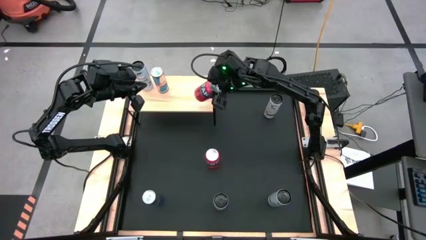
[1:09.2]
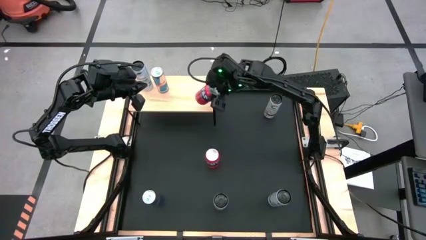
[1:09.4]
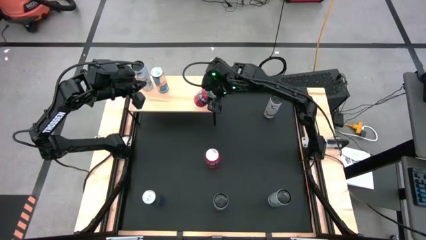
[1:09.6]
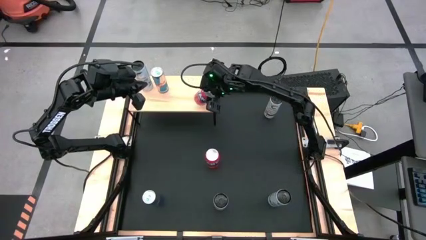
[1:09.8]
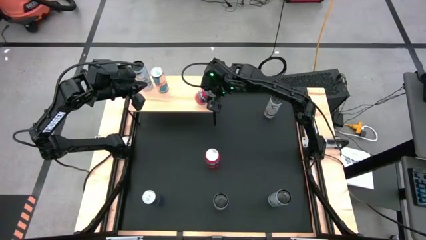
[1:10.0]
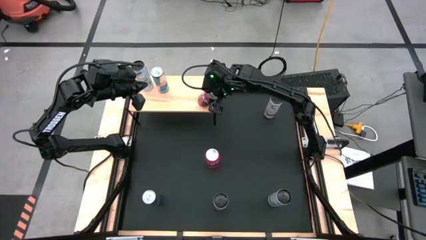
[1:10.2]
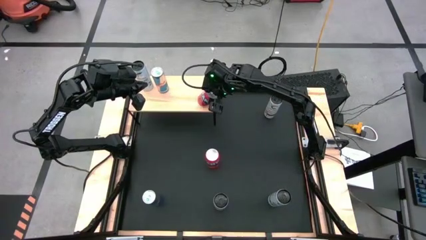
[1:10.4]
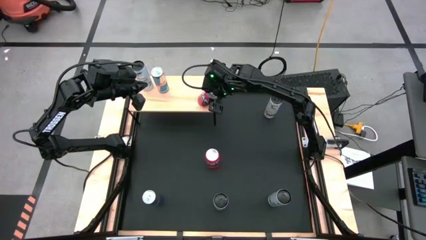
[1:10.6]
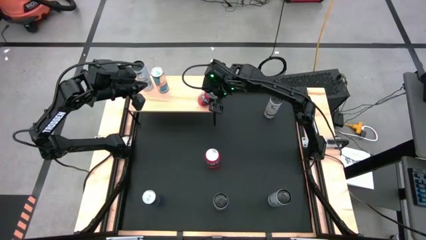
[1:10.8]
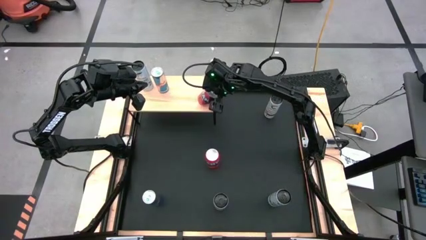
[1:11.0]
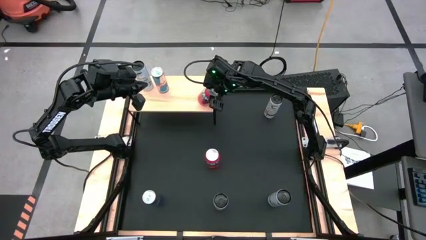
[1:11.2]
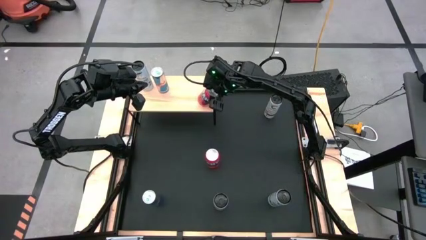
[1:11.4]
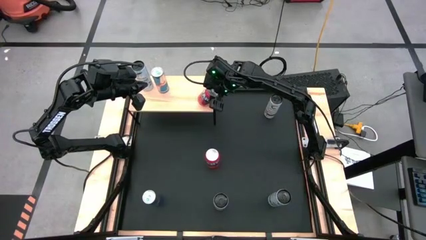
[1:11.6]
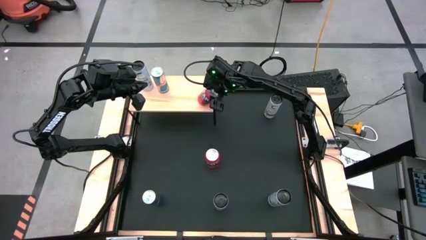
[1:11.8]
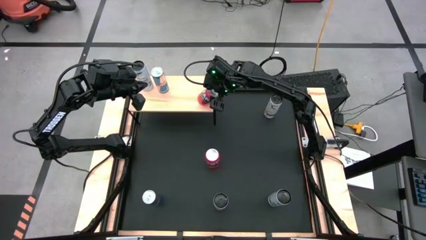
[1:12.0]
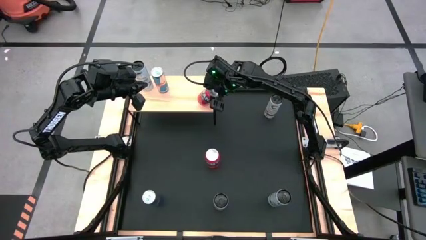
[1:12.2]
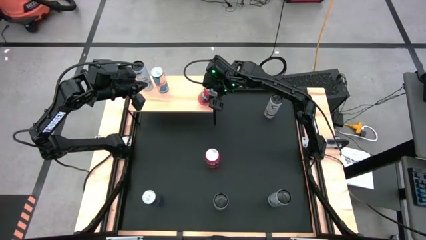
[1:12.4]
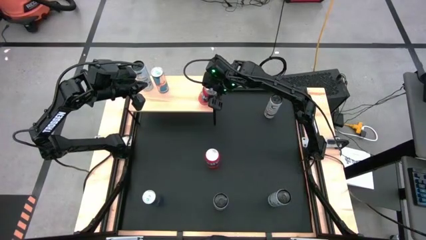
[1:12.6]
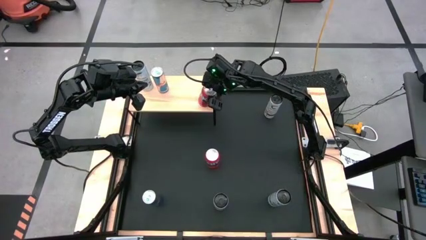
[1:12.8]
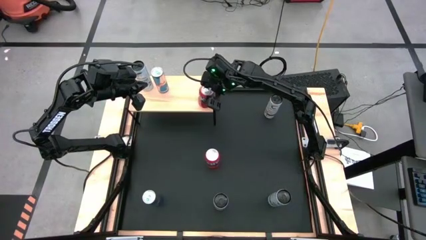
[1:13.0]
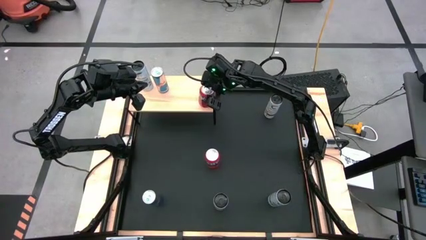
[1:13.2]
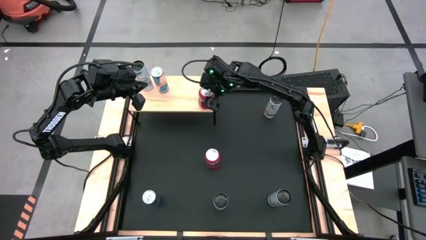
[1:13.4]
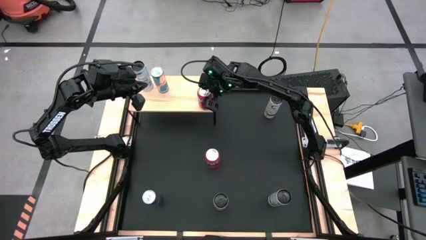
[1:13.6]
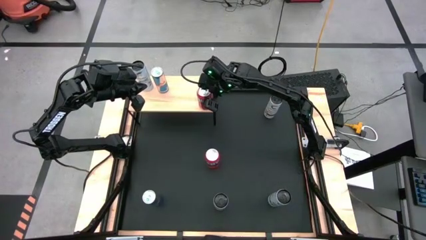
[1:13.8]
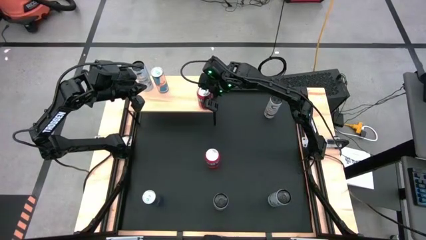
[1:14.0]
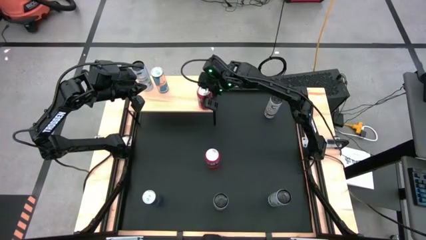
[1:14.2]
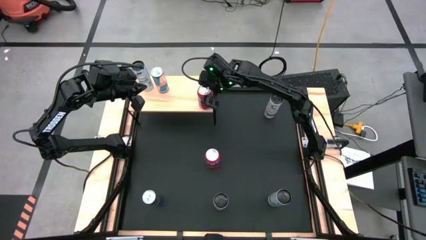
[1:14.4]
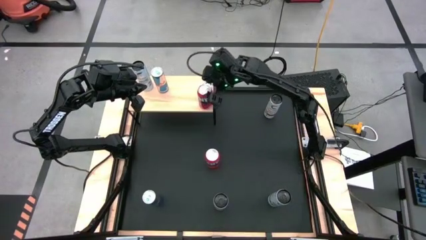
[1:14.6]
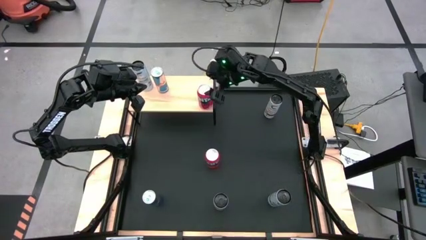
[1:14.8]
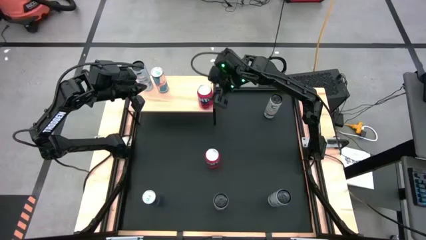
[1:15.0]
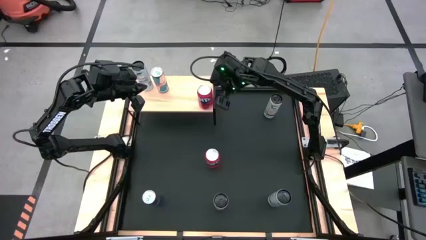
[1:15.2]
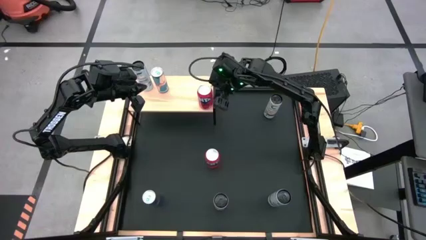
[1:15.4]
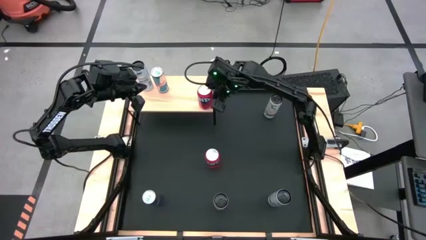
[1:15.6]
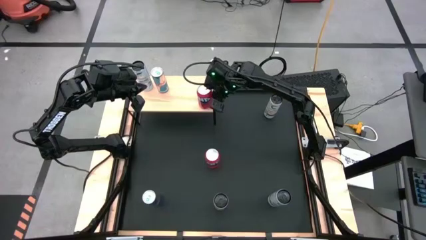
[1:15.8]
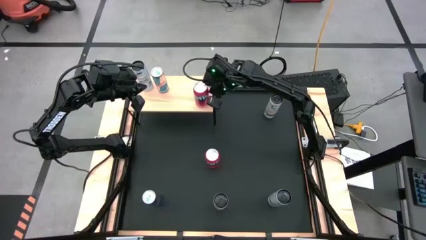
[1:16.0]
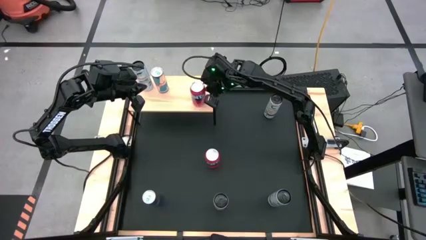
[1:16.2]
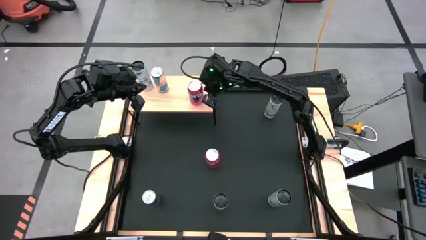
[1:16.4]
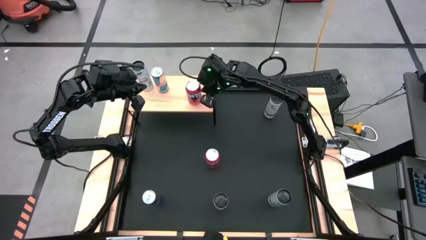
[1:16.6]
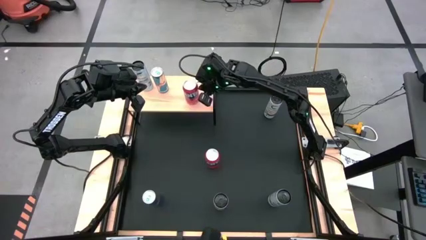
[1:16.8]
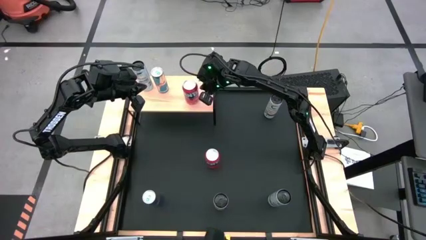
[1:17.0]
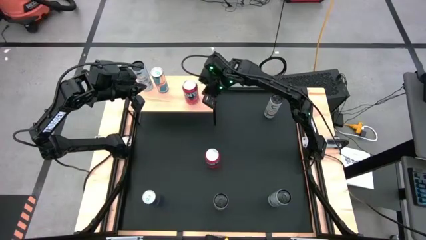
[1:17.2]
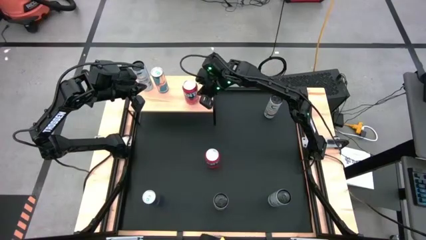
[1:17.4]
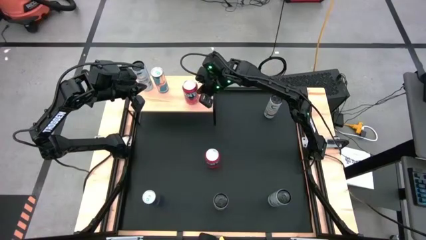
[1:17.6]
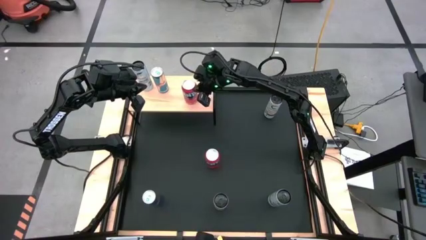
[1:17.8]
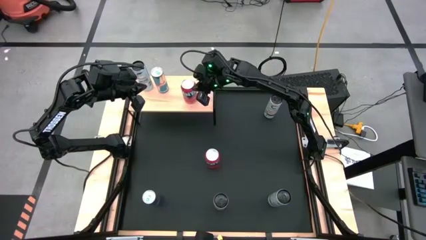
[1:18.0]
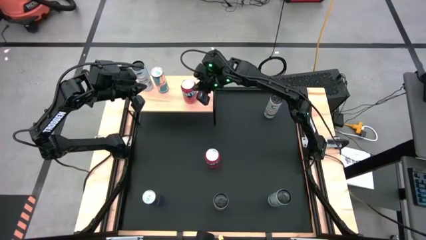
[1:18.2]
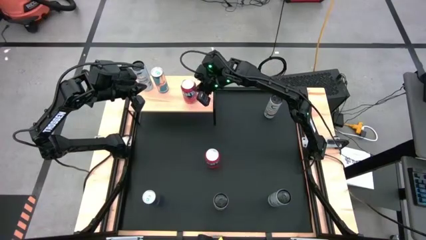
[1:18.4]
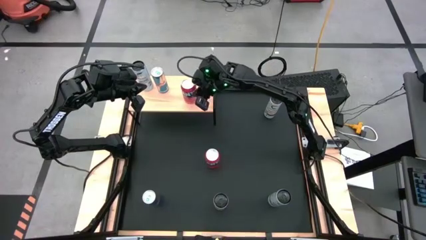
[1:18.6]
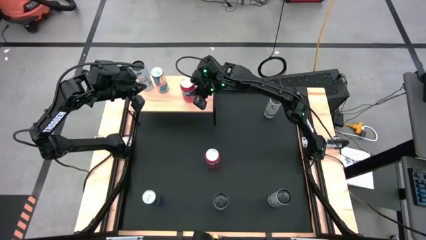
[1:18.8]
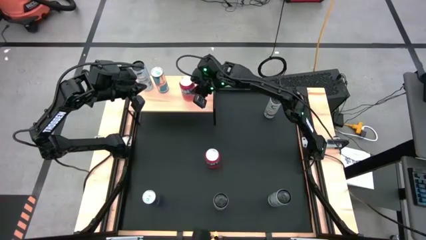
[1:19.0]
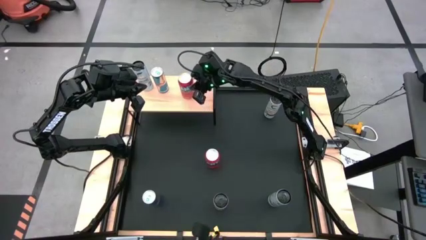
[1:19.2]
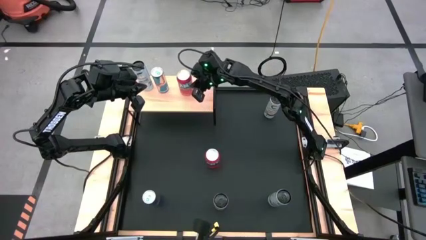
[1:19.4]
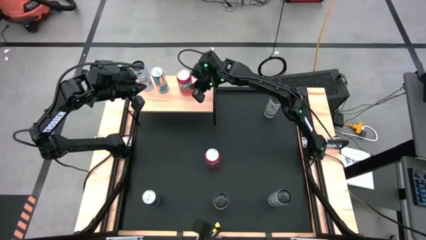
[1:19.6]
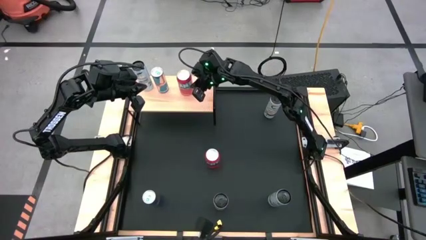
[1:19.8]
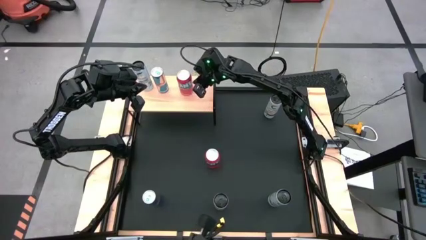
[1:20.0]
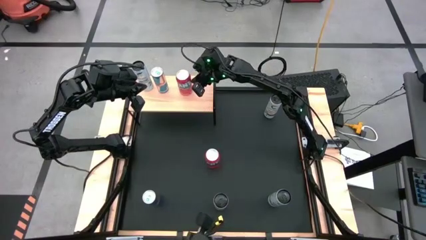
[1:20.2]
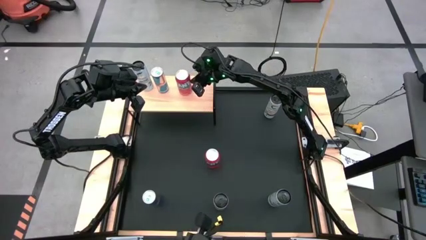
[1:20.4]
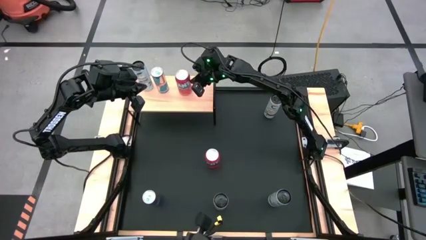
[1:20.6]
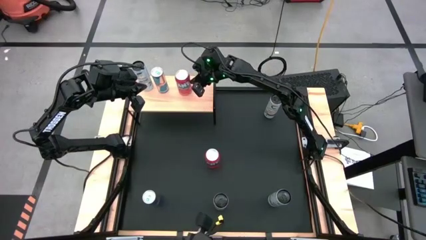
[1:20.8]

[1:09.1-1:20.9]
Task: Place canned beverage on shelf
Put the right red soda can on the shelf

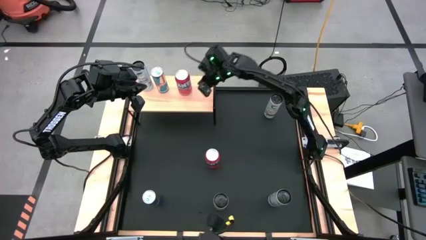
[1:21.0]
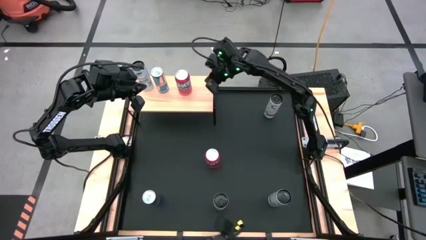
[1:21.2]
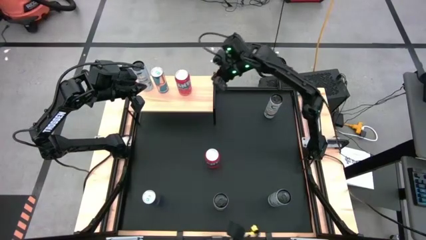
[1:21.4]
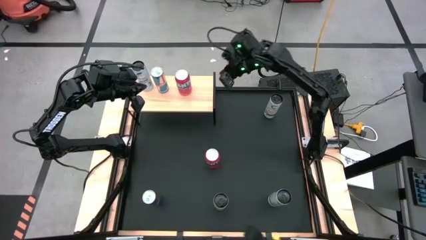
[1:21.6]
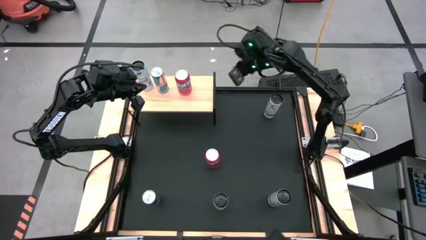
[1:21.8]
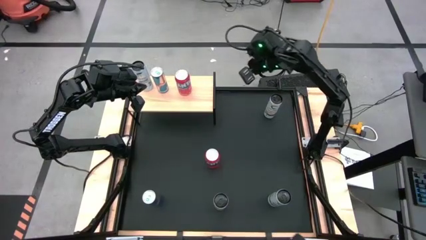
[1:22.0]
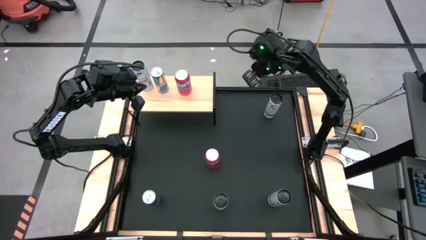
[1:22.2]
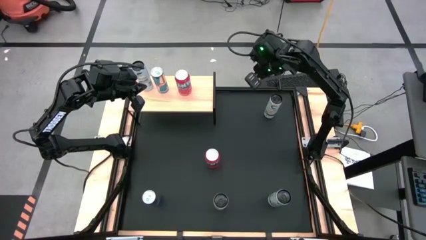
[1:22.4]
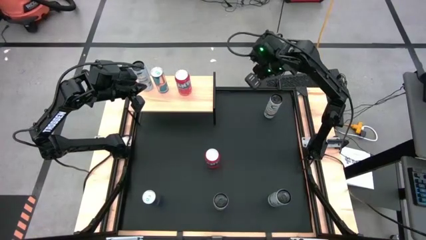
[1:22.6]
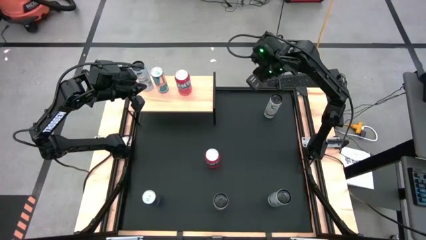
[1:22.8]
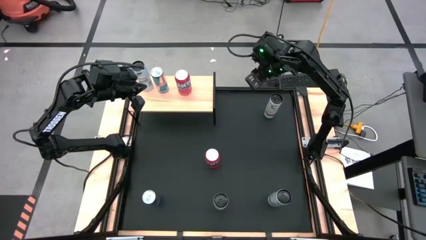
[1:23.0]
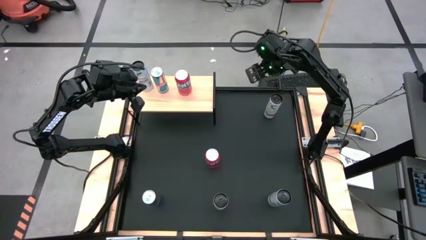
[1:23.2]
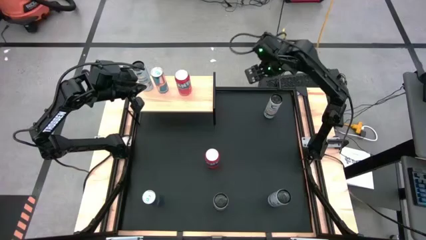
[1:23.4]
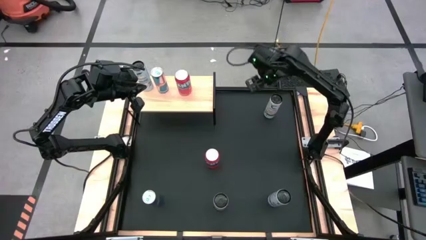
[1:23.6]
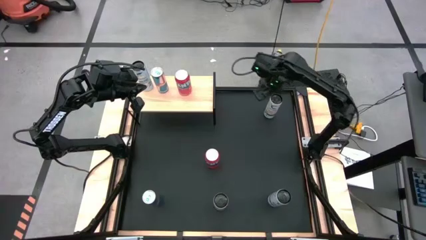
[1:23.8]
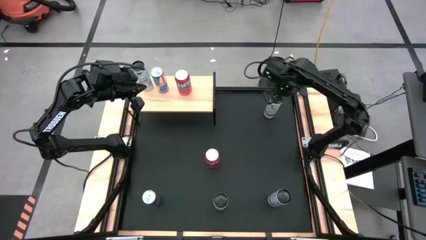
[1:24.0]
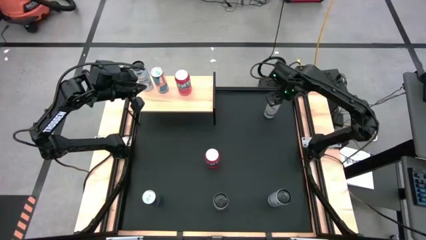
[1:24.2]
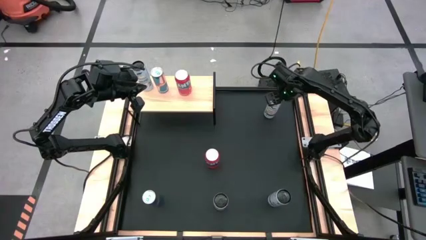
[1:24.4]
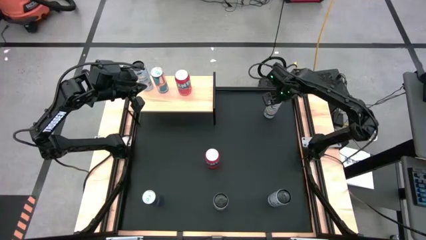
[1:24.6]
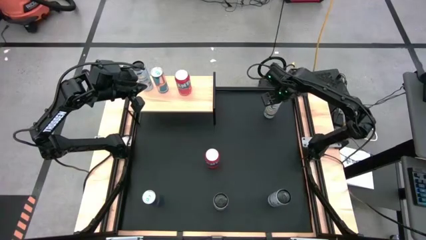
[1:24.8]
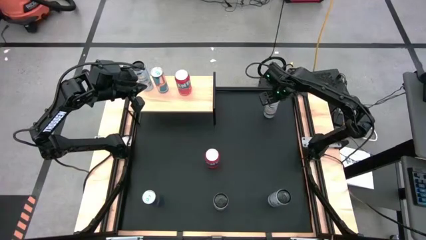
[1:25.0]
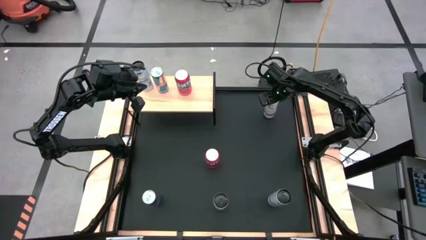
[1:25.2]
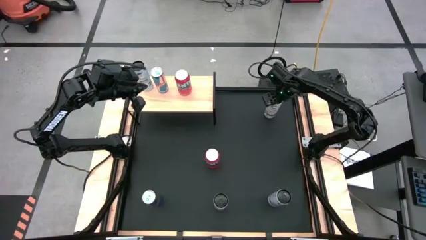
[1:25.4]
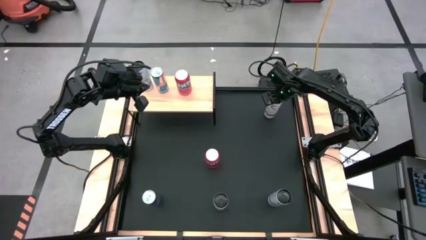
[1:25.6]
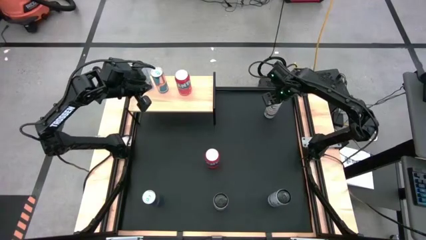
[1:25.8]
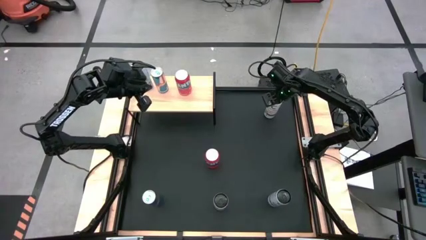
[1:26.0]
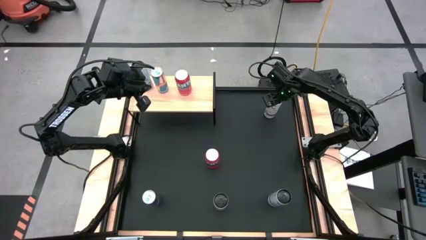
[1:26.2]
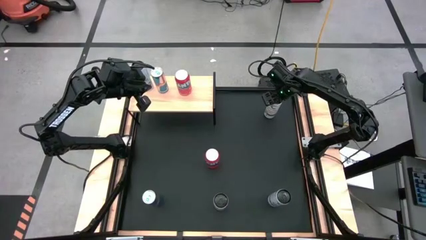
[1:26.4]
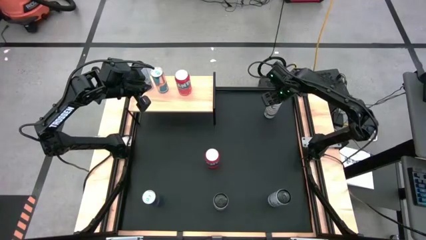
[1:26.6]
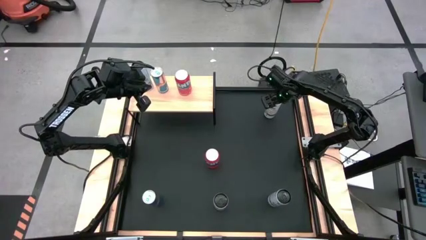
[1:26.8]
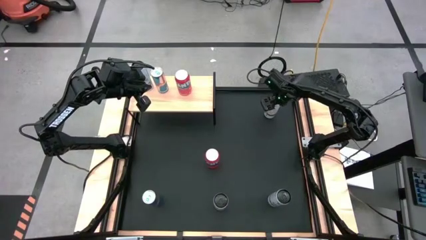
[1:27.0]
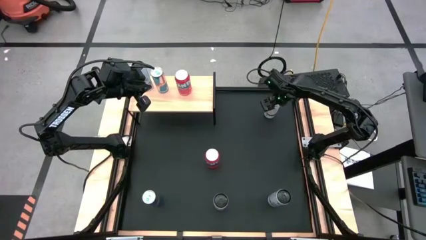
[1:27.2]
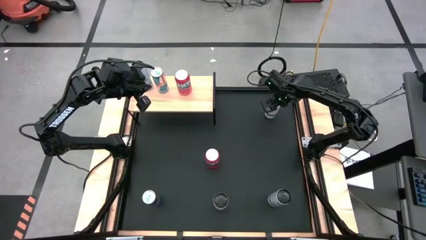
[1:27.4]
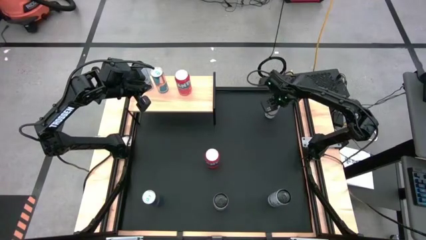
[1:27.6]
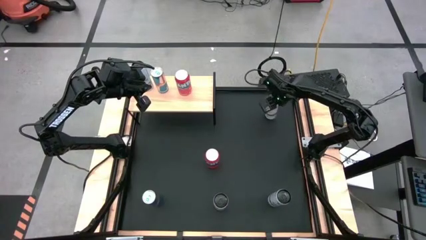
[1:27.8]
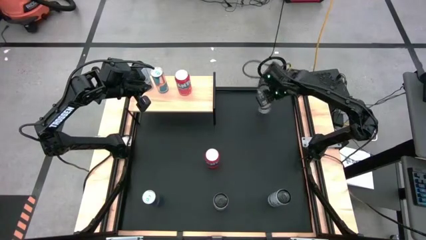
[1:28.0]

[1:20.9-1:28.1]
Put the top white-yellow soda can on the shelf
